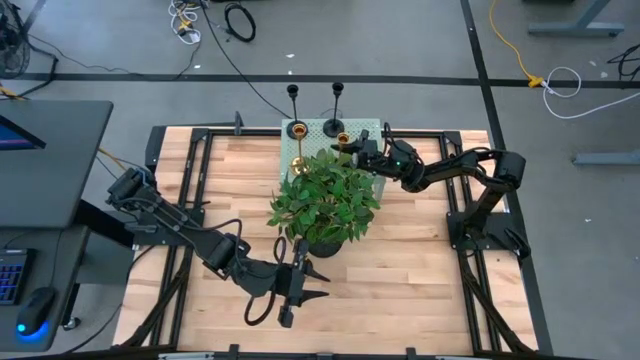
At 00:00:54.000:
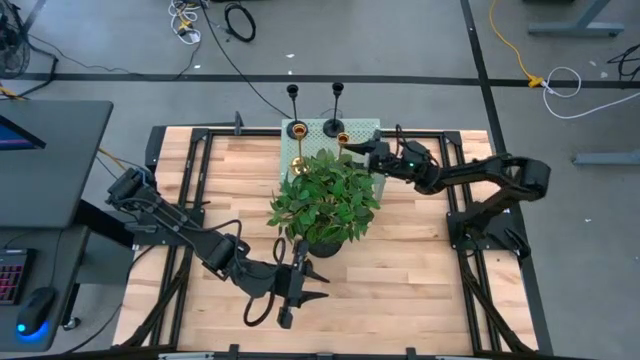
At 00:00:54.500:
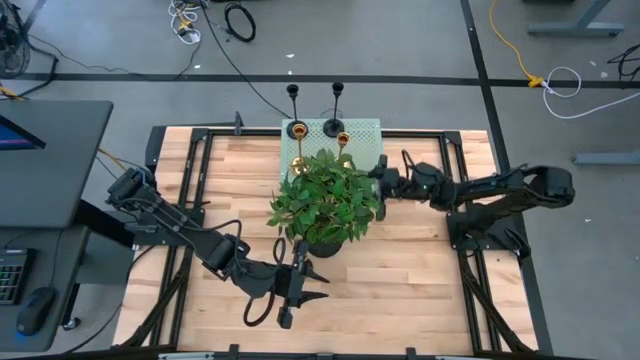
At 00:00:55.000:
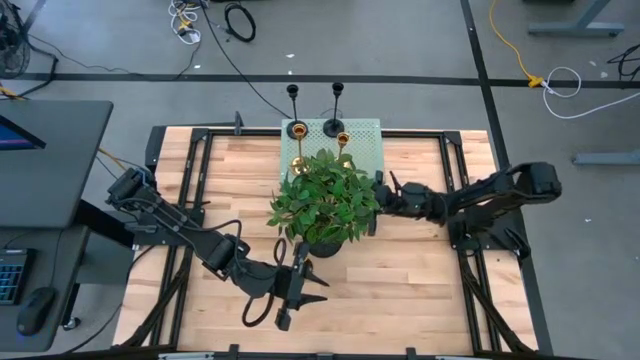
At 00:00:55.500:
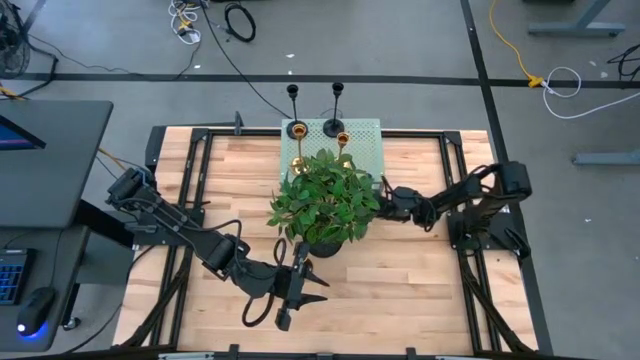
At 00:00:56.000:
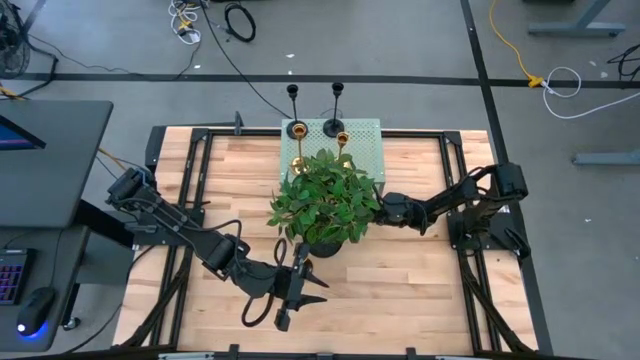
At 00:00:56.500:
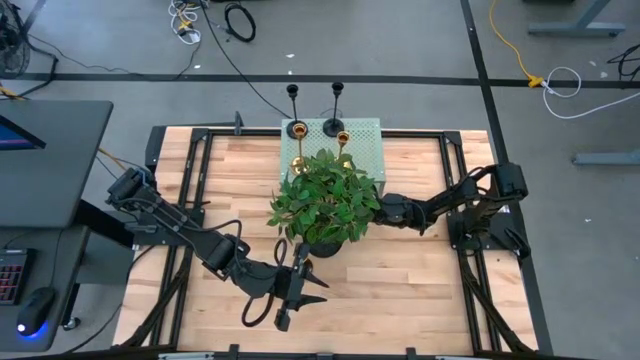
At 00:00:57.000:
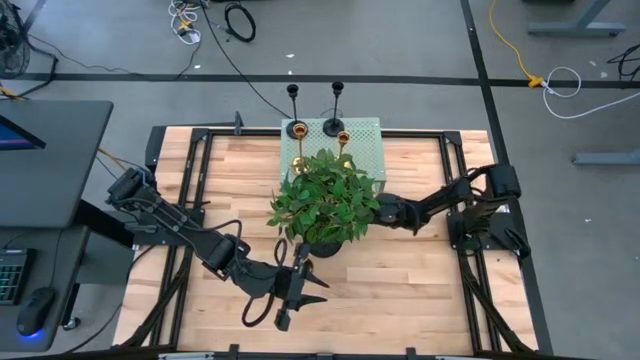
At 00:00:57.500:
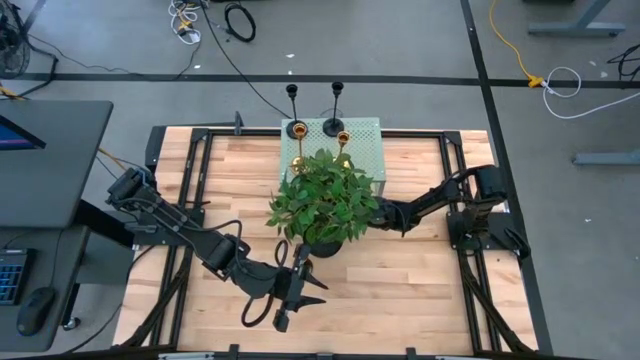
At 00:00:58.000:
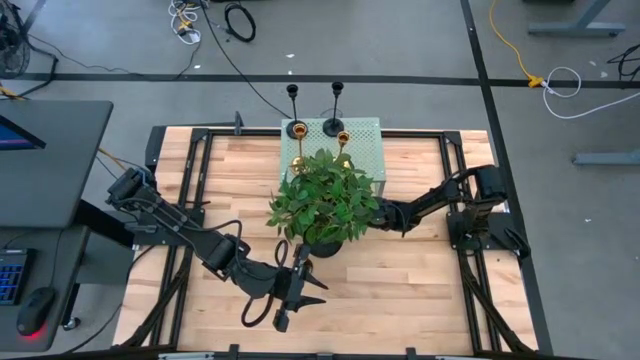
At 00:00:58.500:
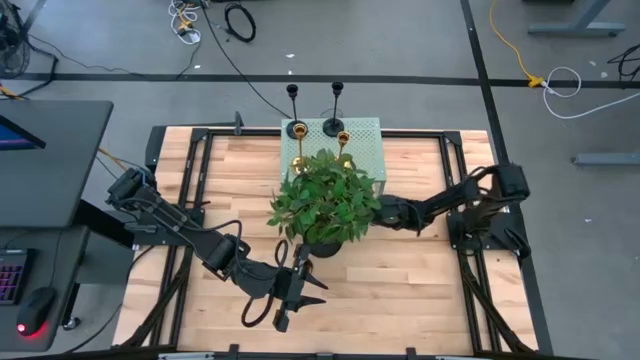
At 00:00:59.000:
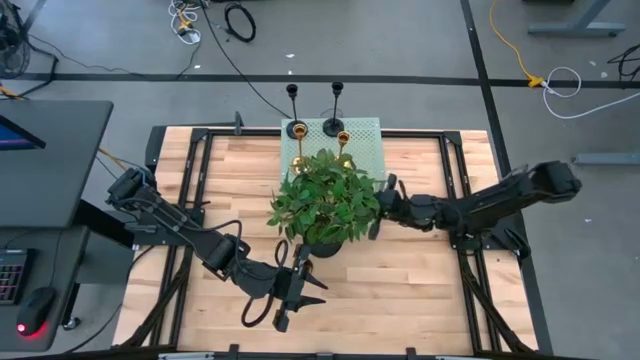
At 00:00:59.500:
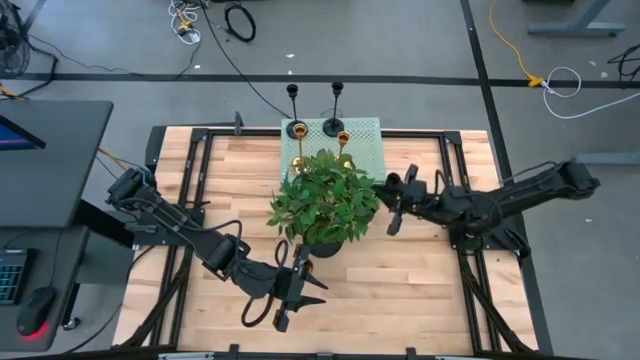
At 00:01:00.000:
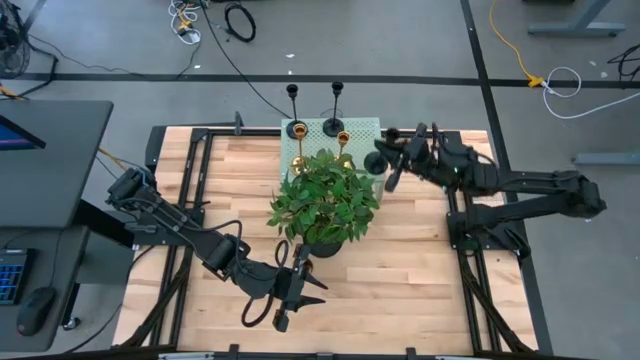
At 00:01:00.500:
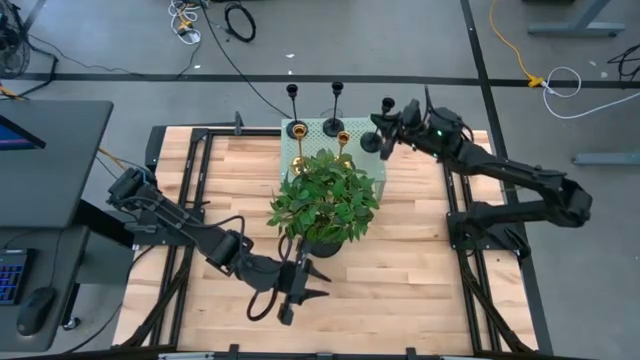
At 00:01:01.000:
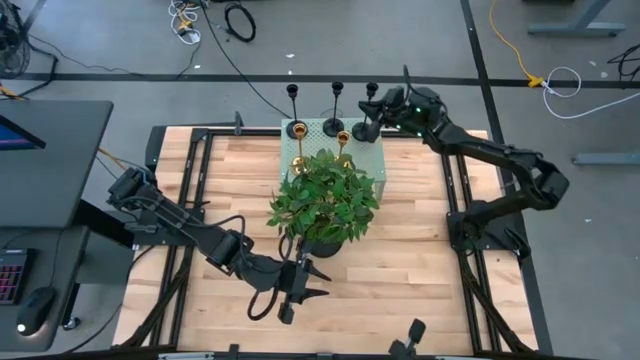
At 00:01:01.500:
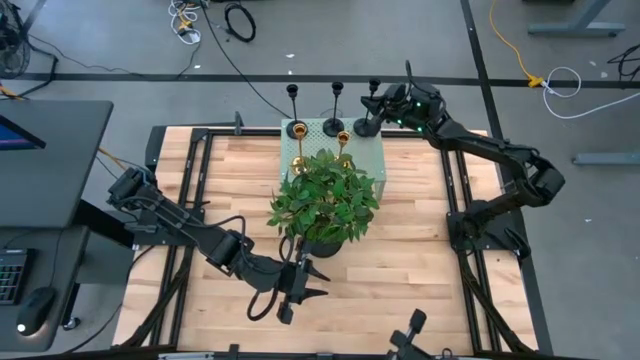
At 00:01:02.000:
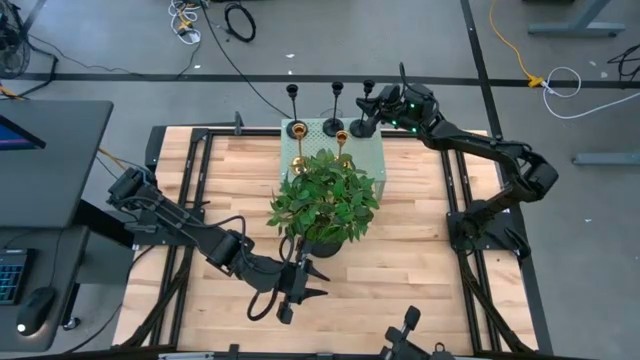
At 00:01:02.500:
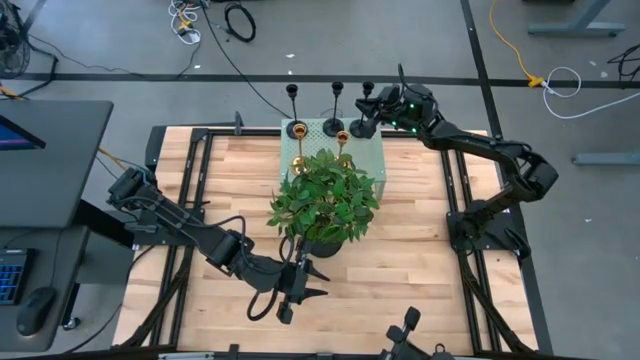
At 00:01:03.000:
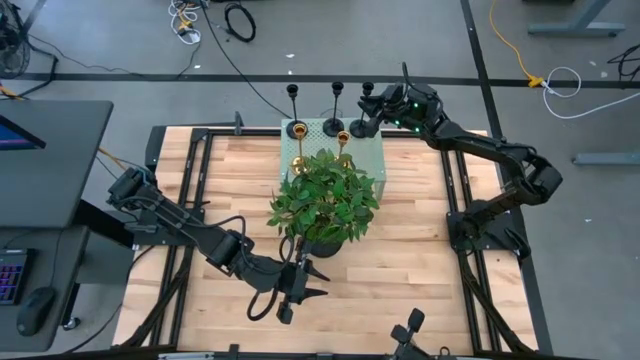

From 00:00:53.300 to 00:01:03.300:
Task: Pick & Place candle stick holders
Put the black candle holder on the shelf

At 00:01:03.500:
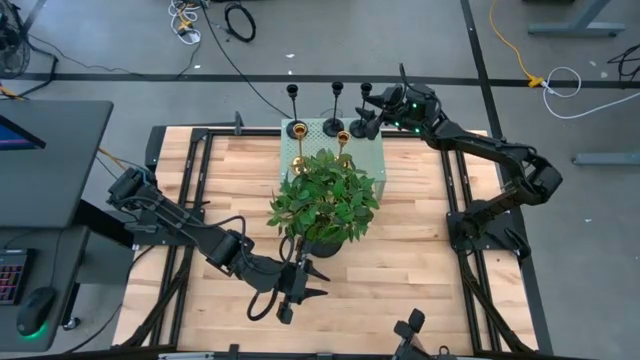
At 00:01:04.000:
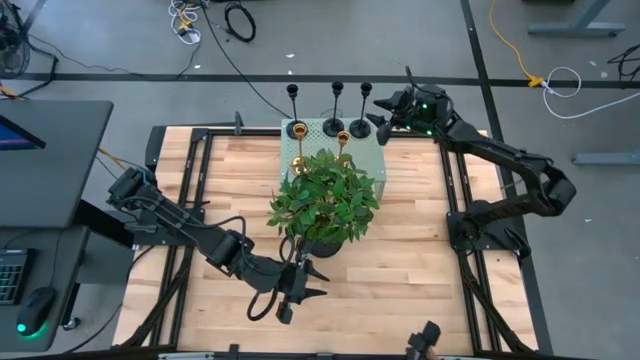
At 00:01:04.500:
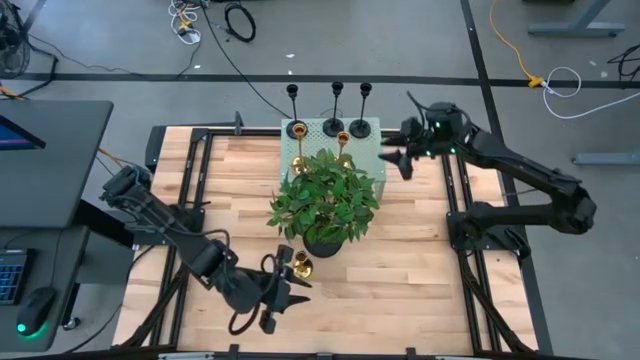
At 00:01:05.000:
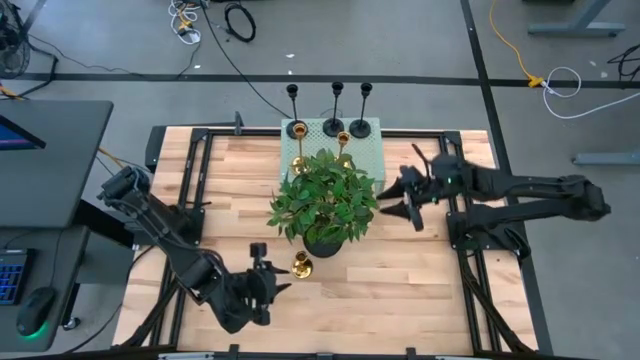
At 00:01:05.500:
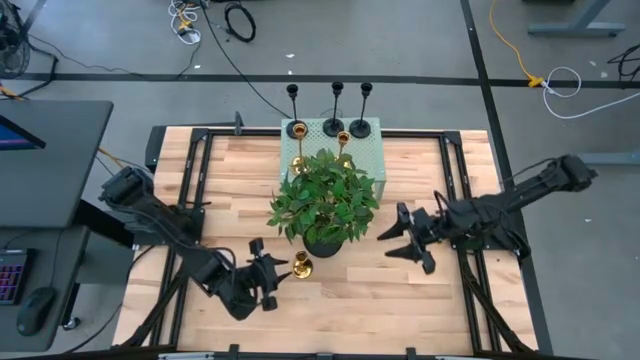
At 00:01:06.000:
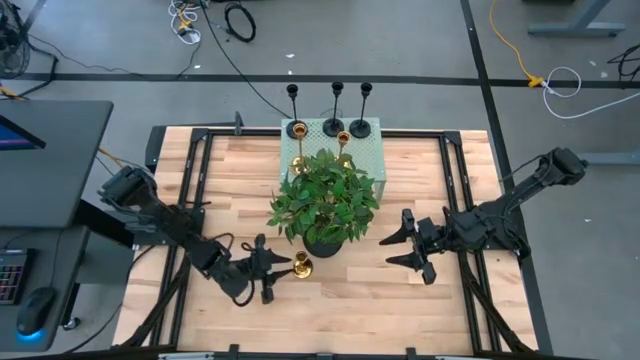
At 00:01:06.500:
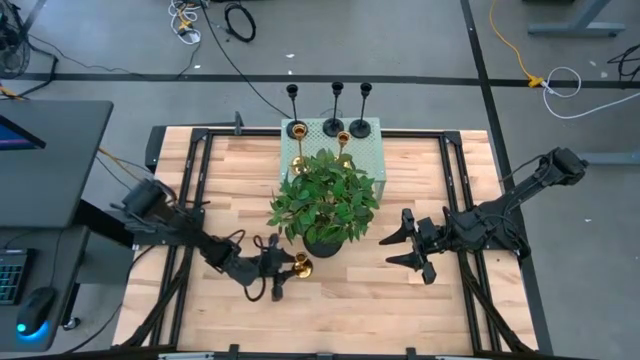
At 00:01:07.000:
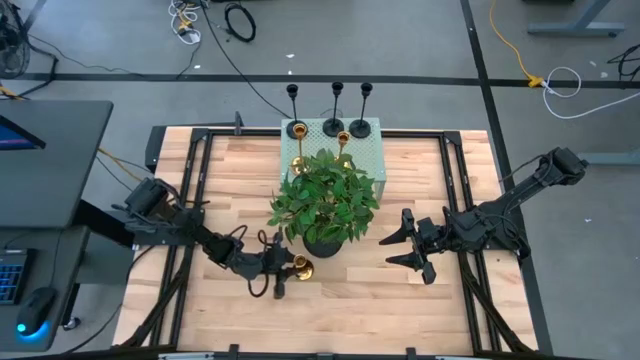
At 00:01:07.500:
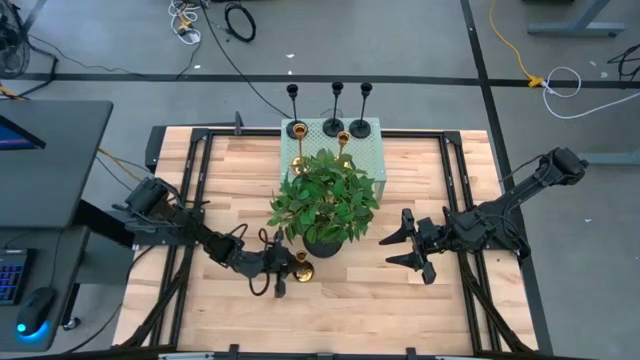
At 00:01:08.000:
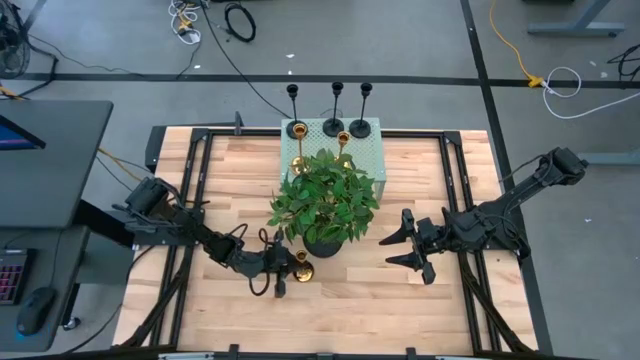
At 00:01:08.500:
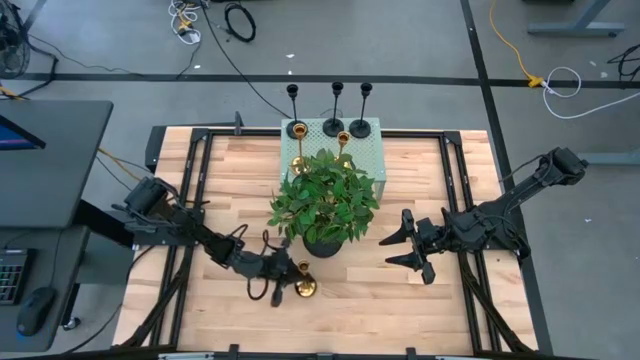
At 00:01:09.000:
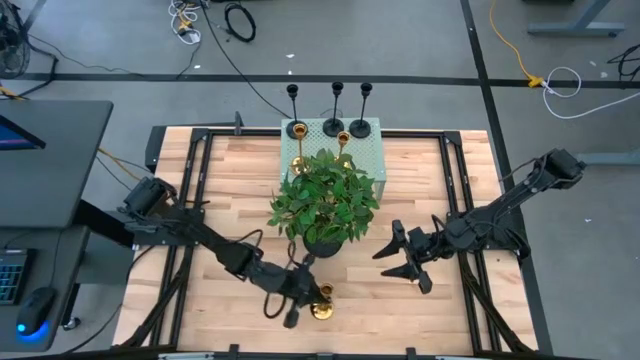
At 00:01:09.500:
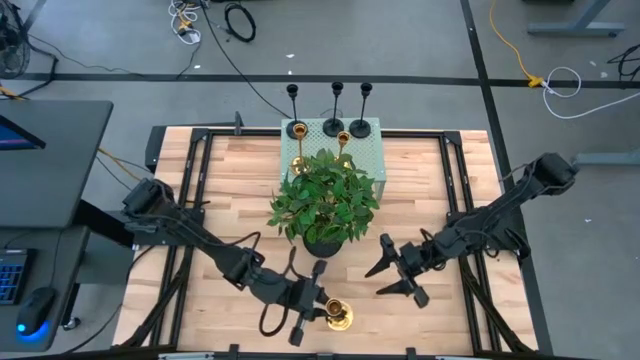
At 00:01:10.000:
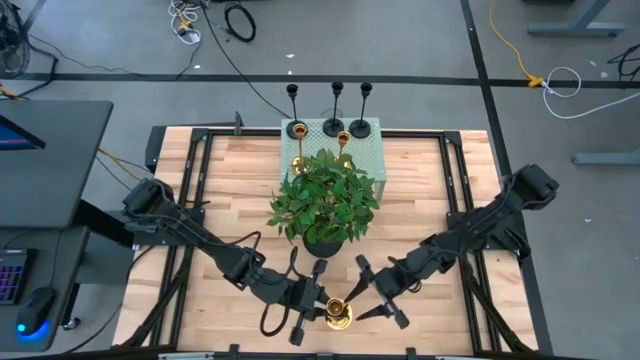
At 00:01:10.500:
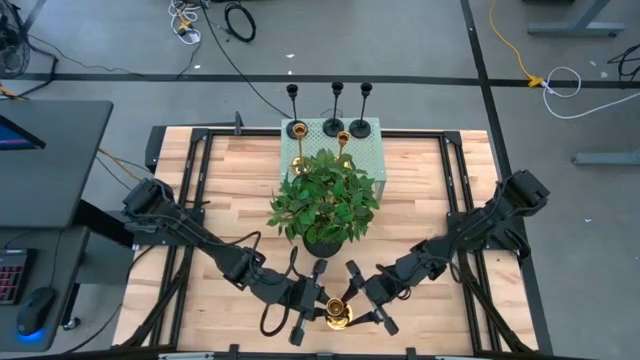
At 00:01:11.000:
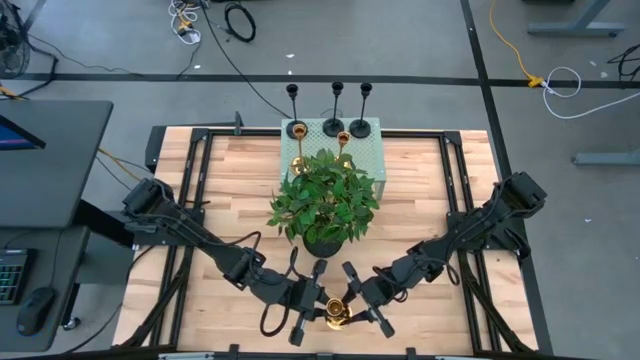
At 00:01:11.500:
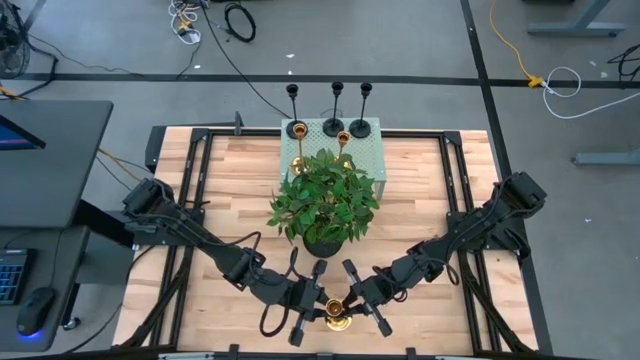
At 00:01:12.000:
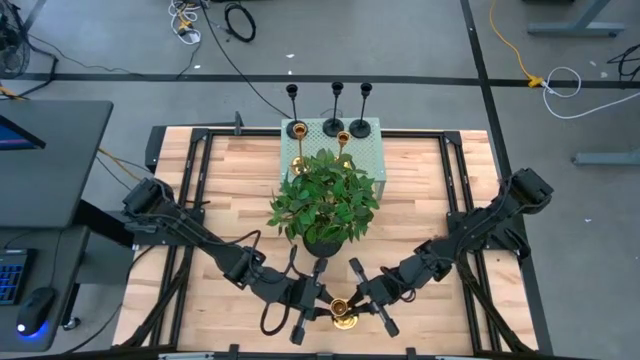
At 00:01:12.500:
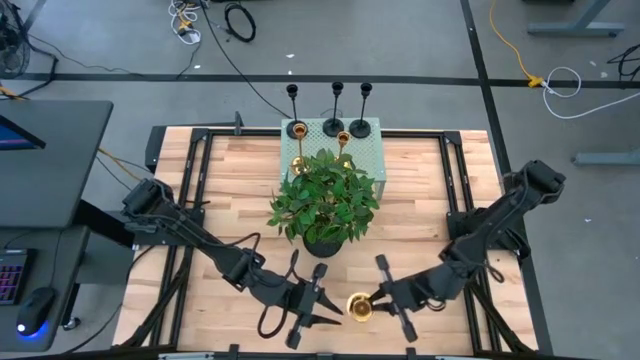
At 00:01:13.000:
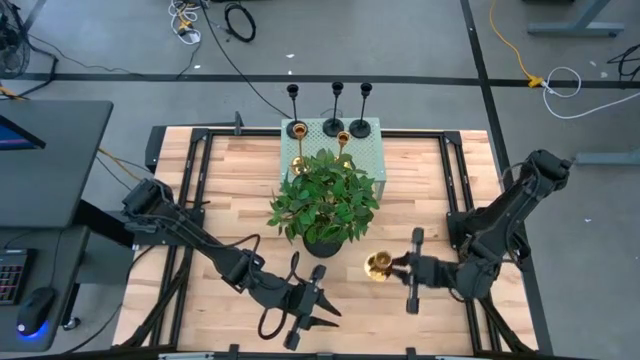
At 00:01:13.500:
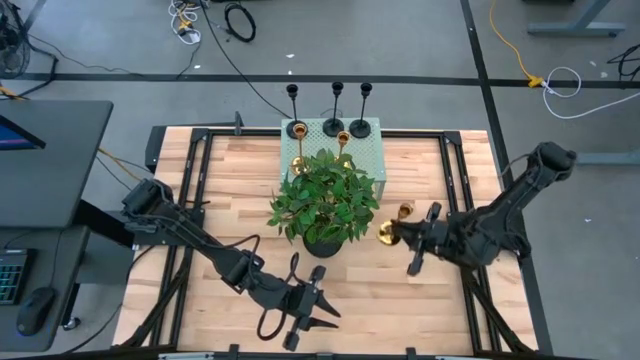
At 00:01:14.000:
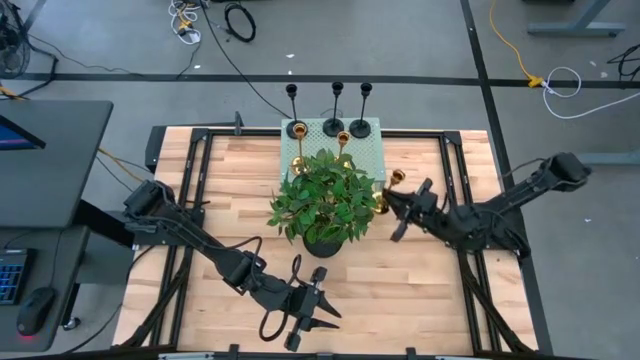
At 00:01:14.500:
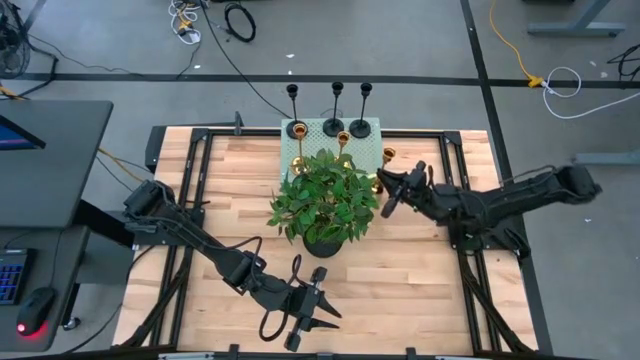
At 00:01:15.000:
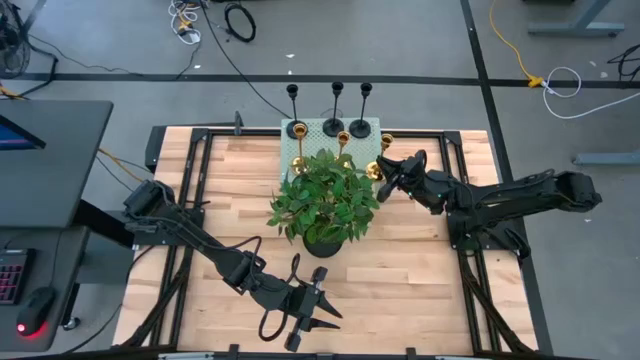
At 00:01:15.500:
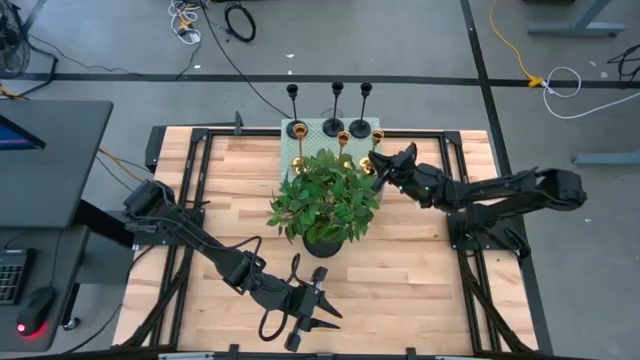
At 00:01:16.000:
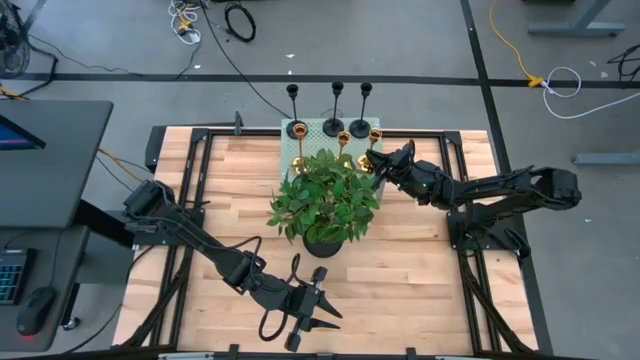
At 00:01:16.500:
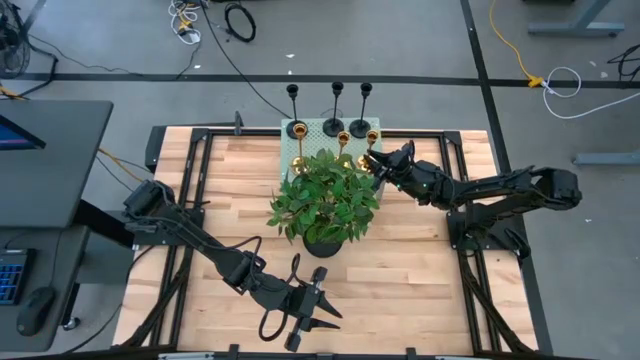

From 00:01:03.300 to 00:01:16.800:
Put the gold candle holder on the shelf
